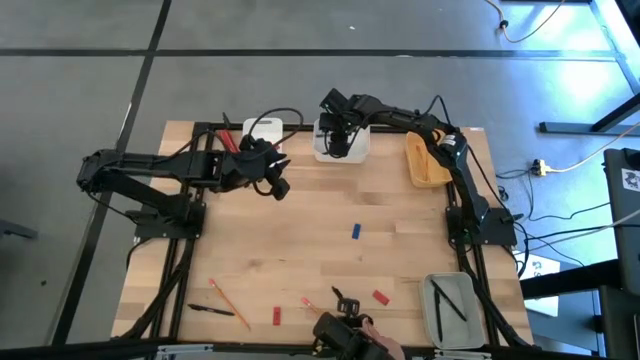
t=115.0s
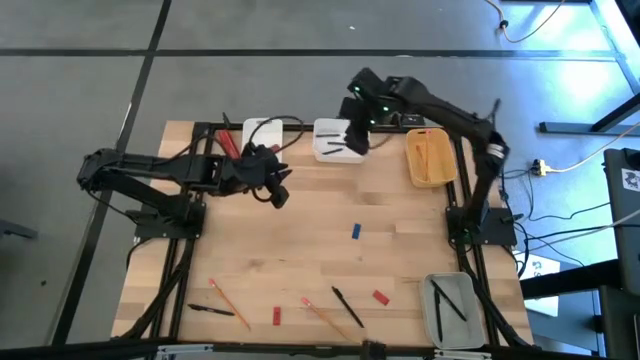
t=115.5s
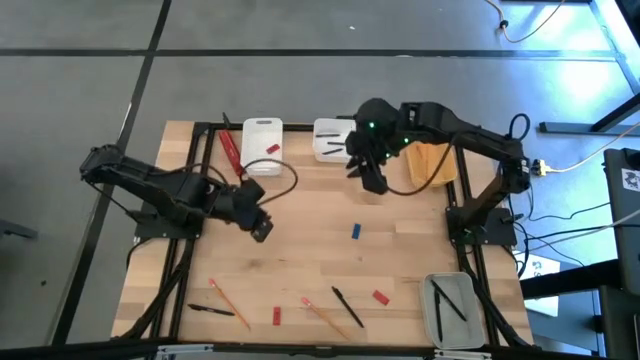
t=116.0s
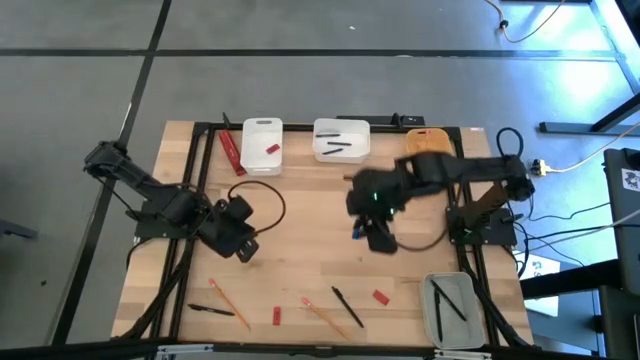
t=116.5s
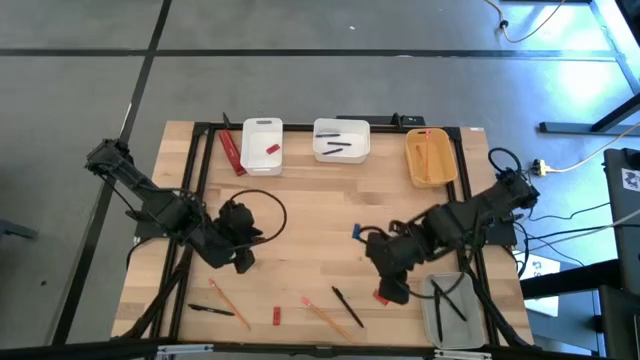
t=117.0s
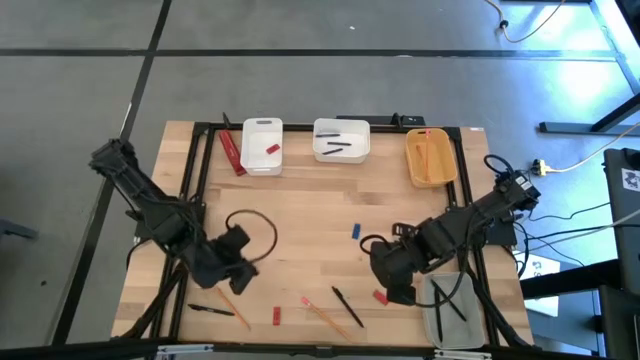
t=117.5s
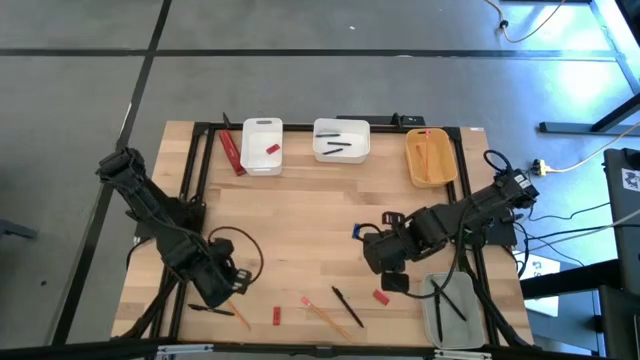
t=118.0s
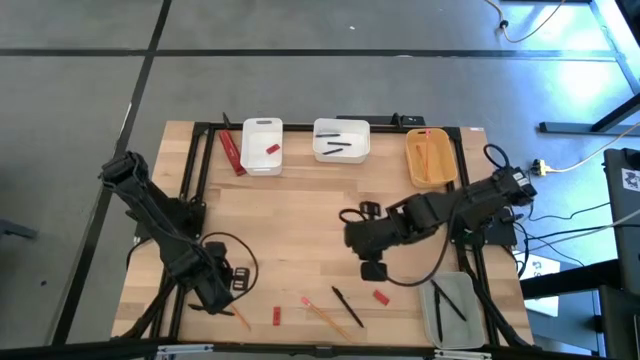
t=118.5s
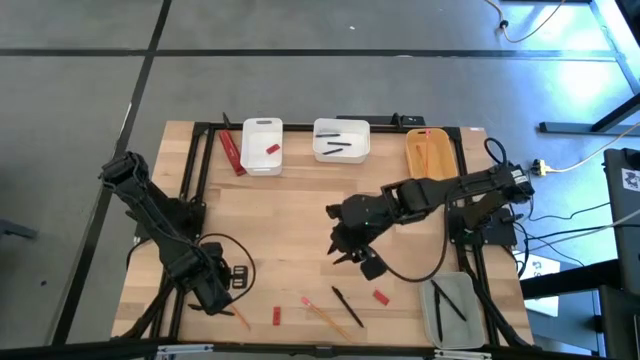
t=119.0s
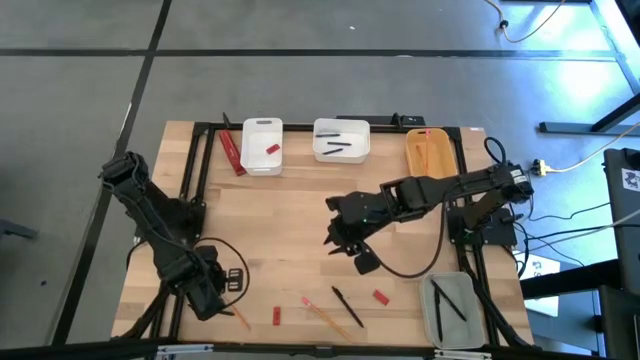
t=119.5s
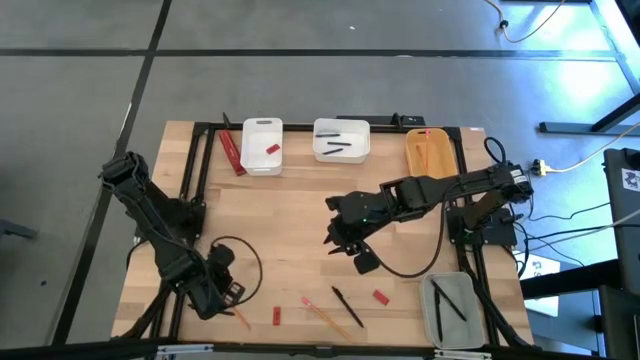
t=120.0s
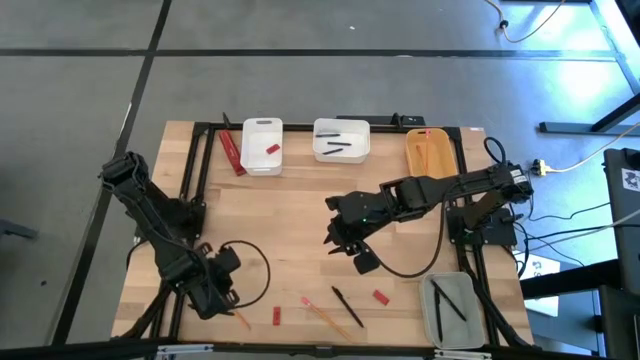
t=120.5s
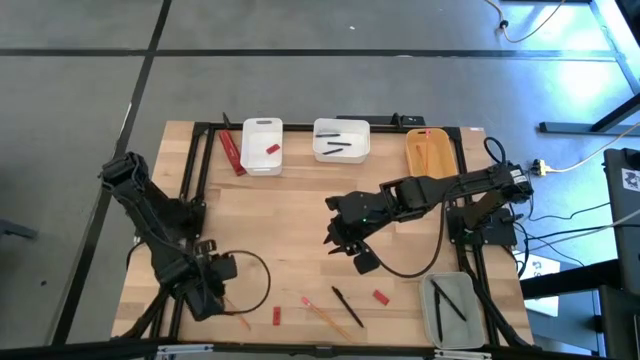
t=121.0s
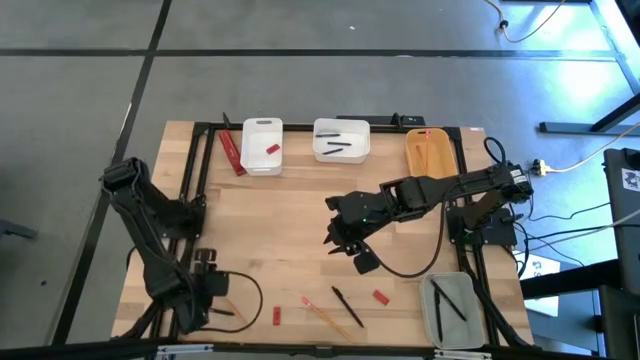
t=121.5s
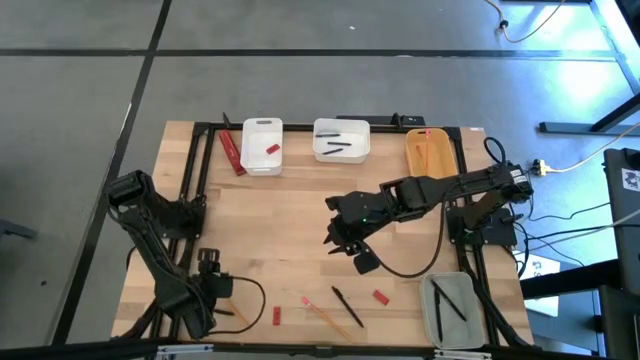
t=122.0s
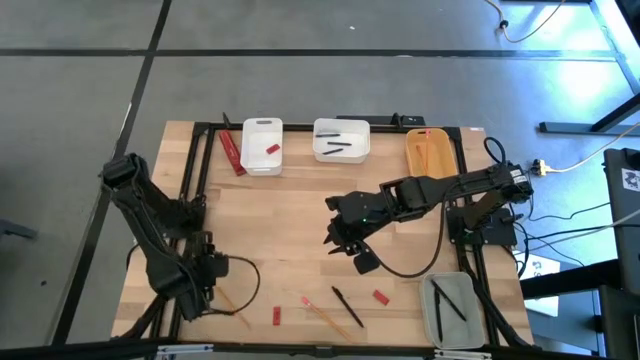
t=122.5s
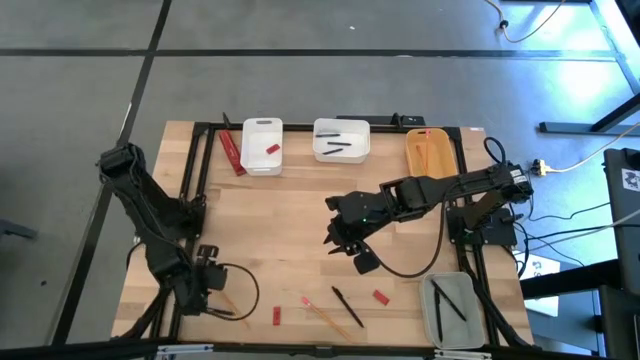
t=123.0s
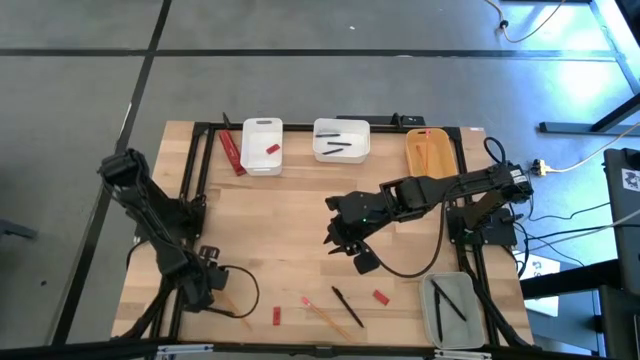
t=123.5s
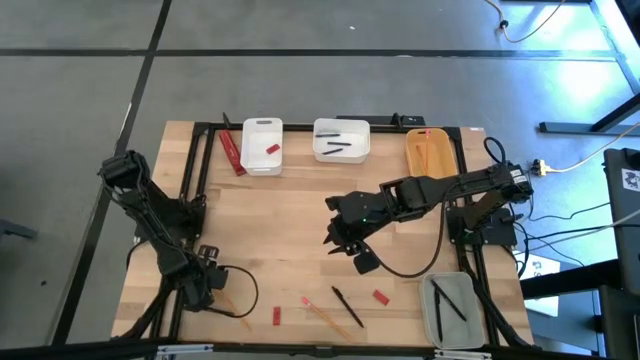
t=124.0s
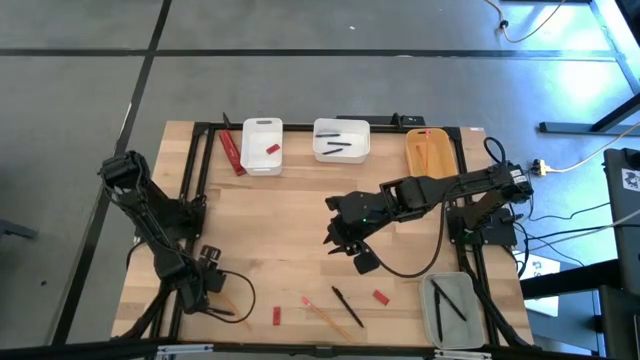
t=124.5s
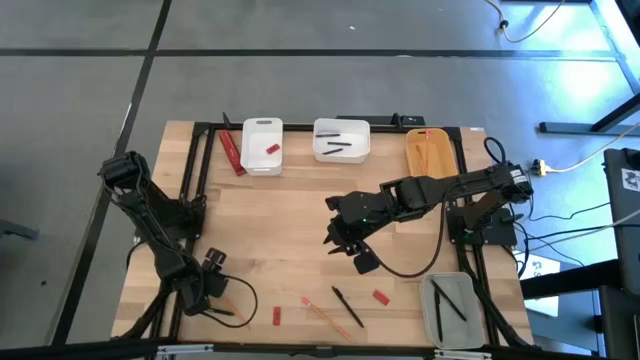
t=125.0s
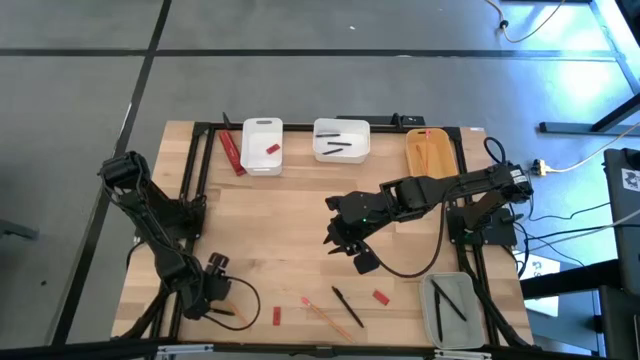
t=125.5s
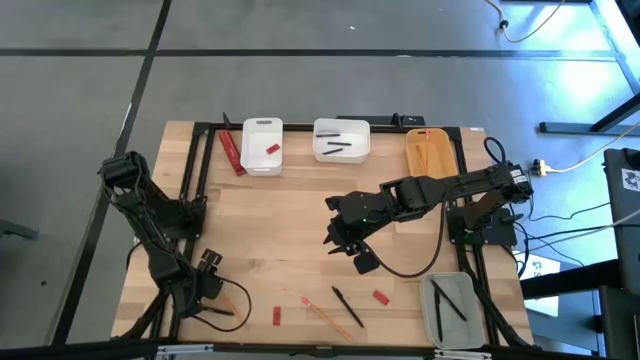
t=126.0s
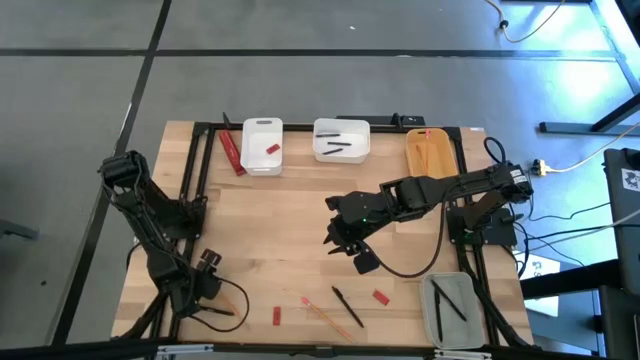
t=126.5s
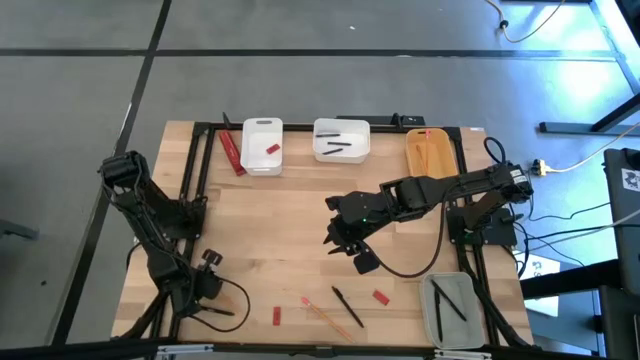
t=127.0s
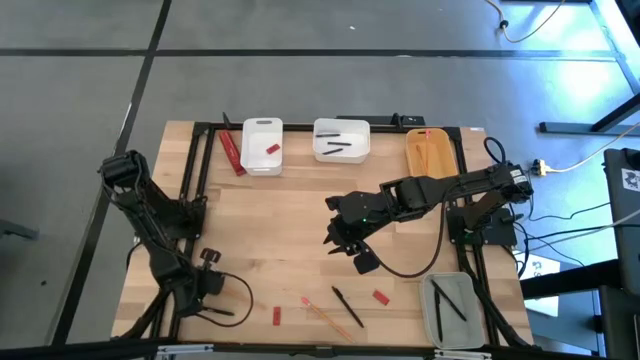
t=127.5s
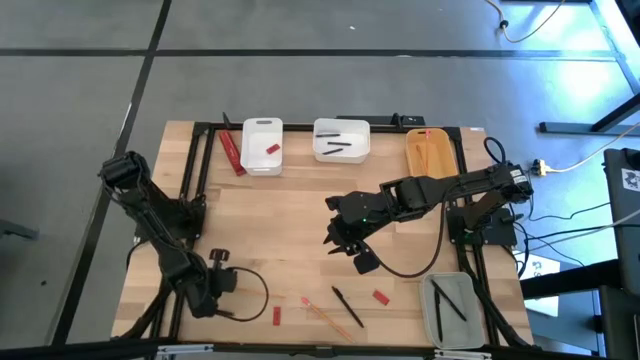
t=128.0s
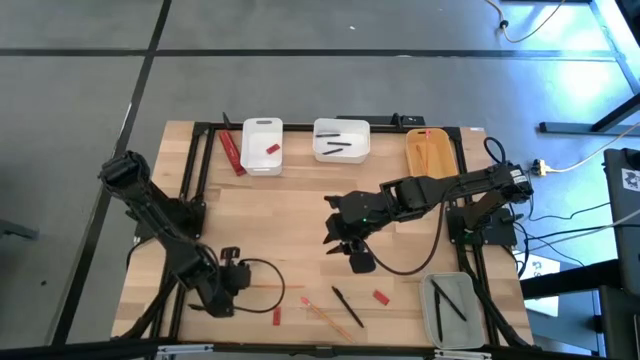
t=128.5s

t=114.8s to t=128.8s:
Task: Sort crayons/erasers/pens/pencils in bins
Put the yellow pencil into the yellow bin

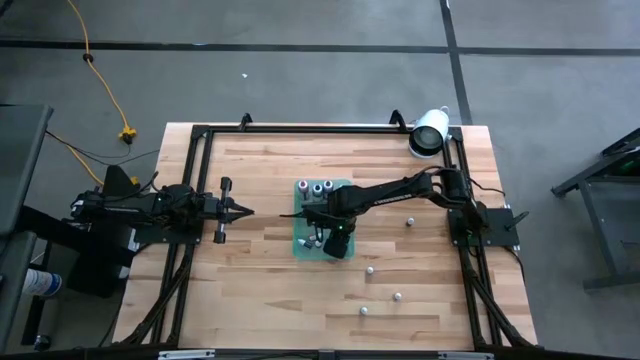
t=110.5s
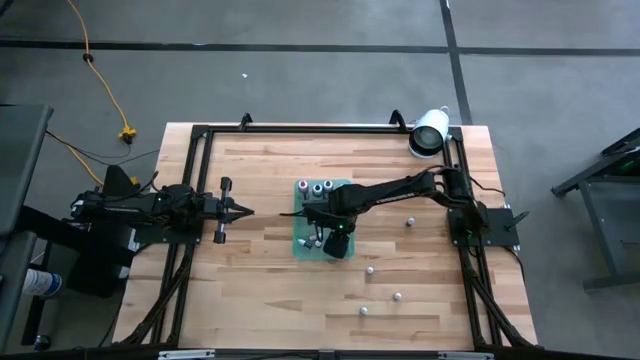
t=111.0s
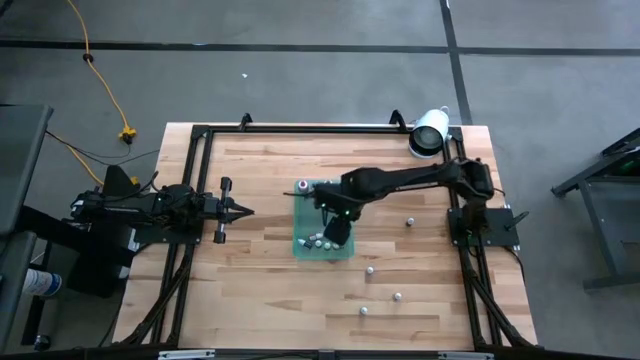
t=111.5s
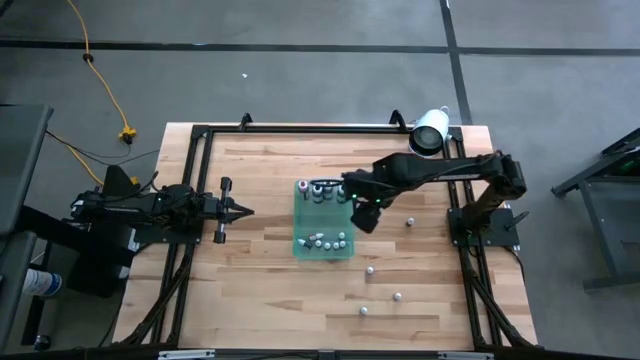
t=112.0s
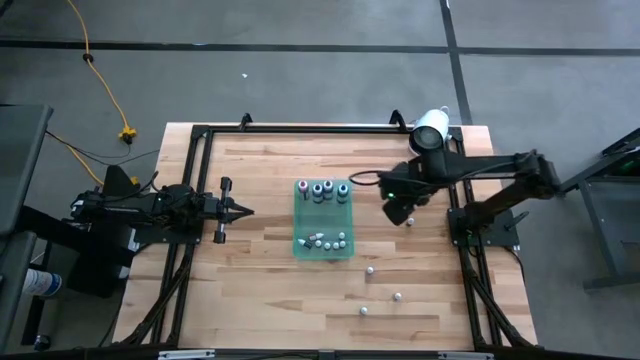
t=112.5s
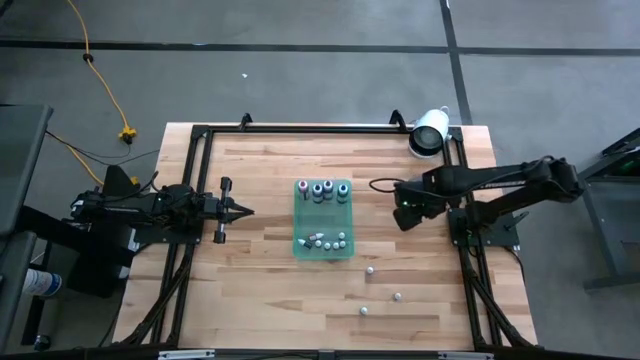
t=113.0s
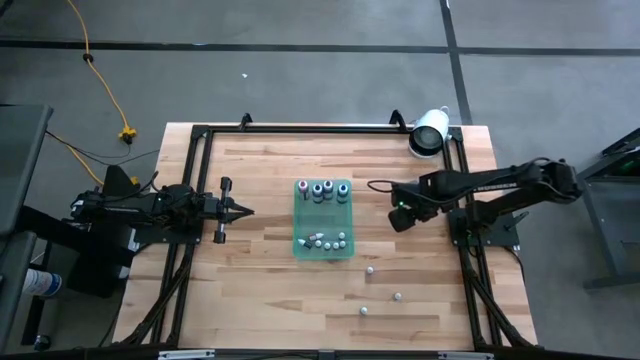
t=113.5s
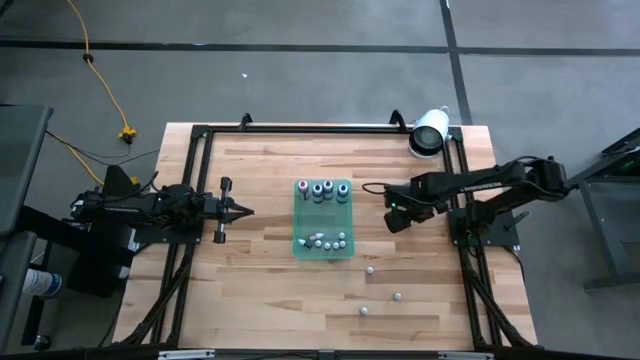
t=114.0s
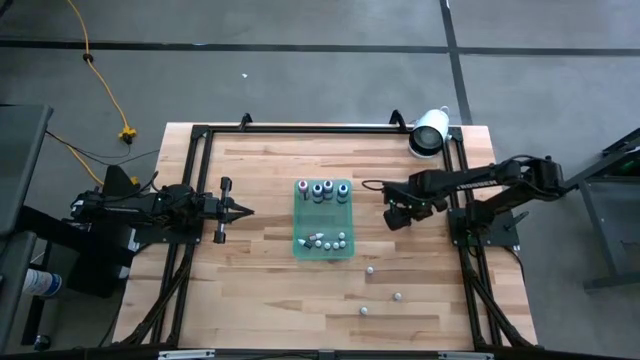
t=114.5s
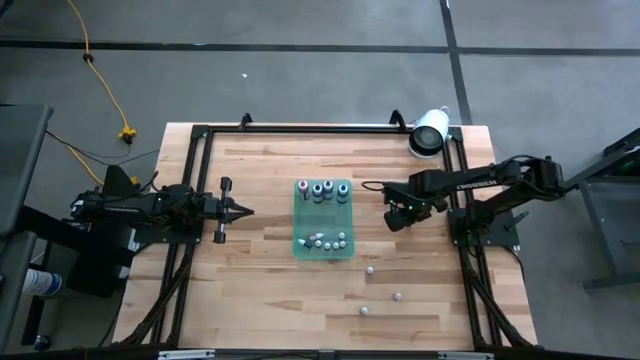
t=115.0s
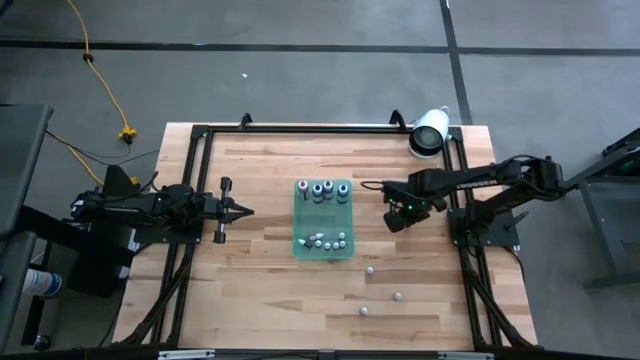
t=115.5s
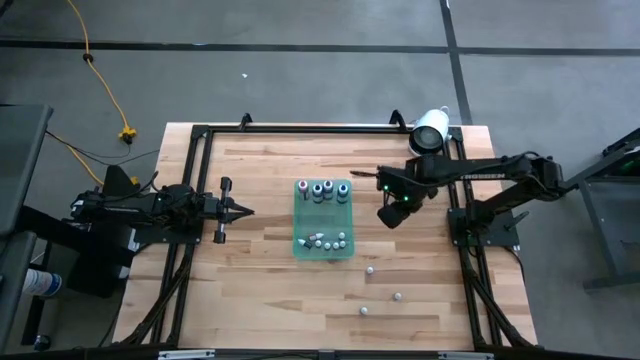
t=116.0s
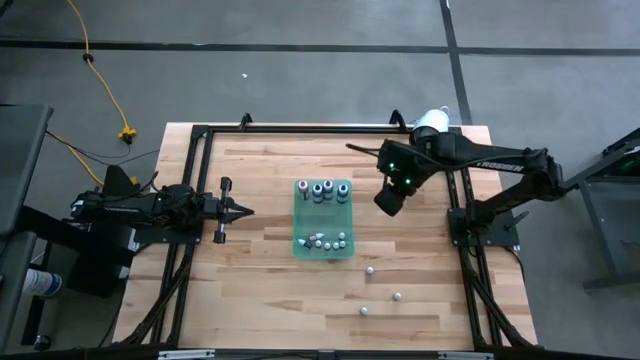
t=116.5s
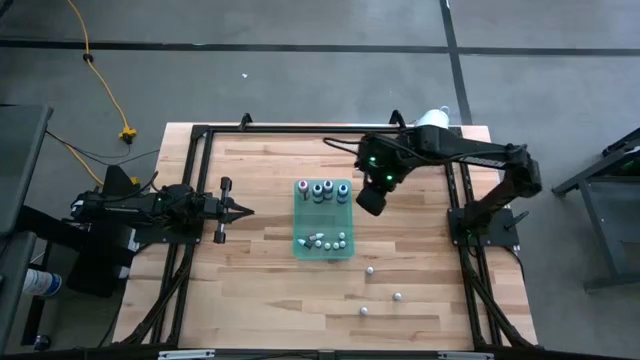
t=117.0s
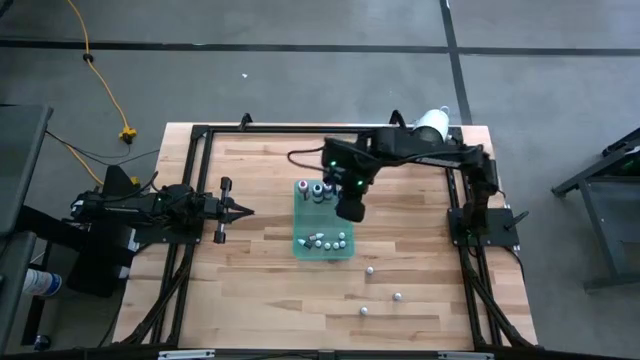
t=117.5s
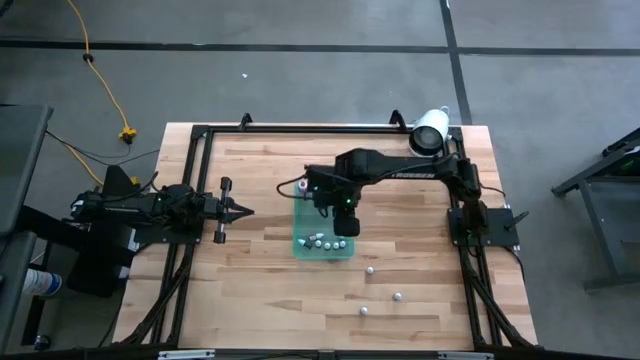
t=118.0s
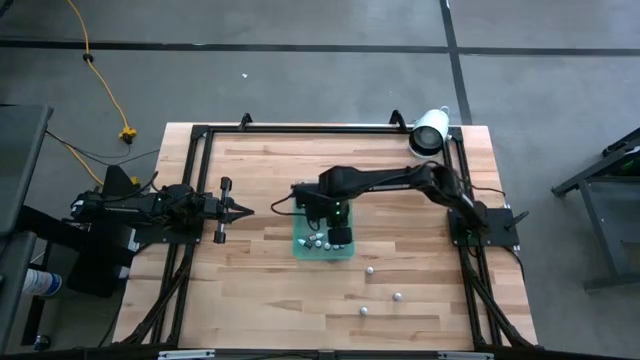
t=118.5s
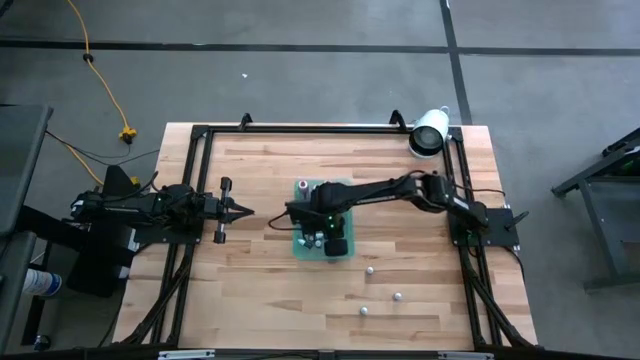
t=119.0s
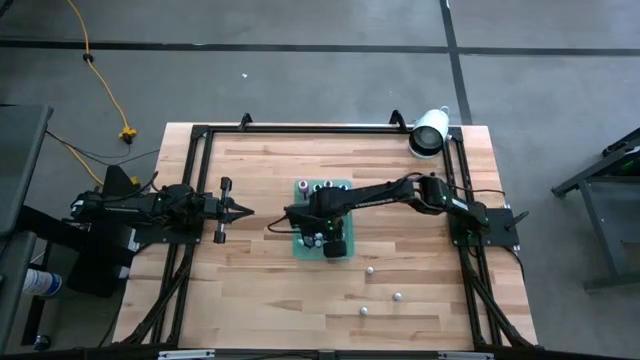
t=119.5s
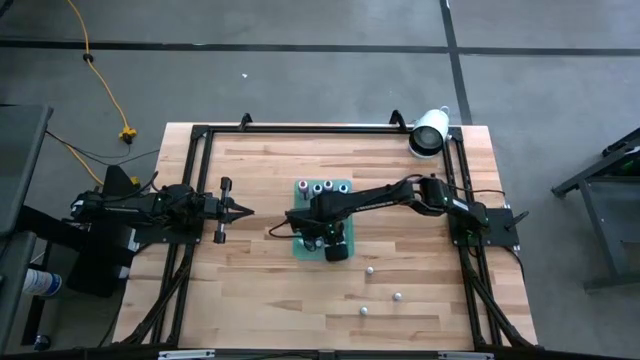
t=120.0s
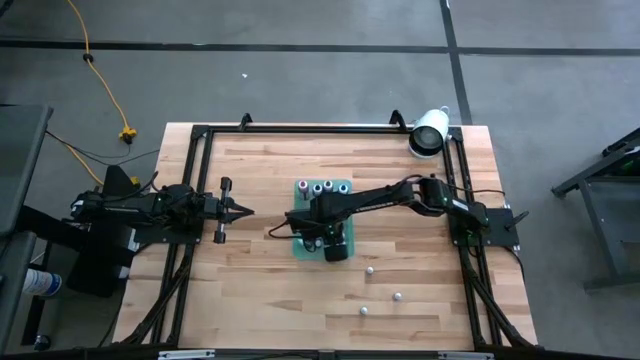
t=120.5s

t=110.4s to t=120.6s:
Task: Pick & Place food coloring
Put the small black food coloring bottle into the green bin
